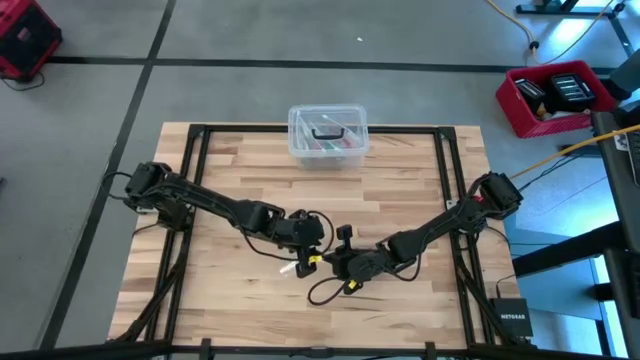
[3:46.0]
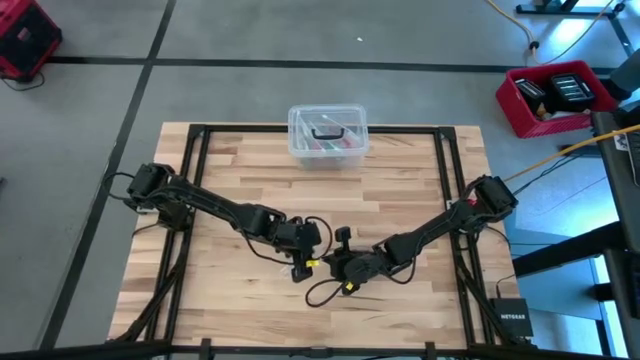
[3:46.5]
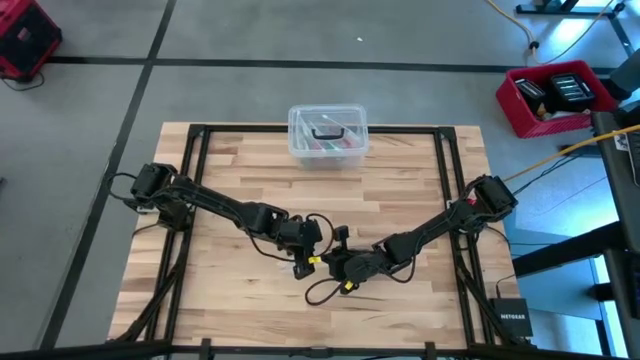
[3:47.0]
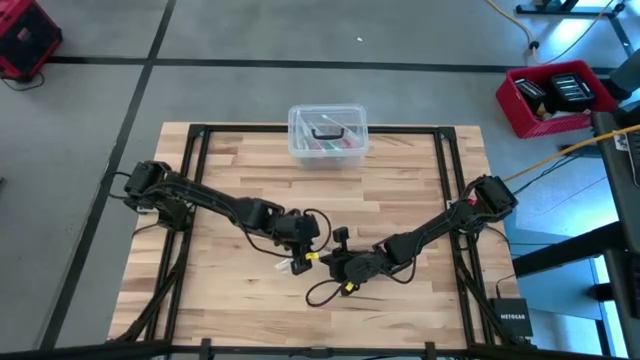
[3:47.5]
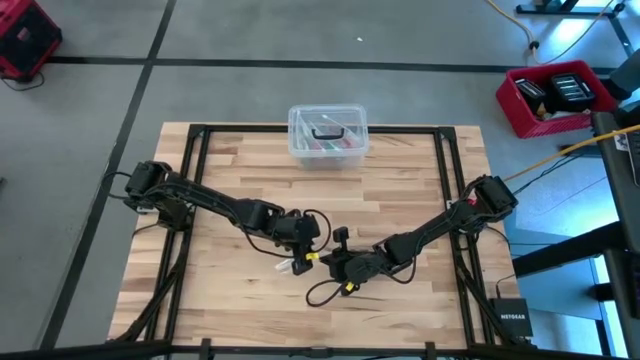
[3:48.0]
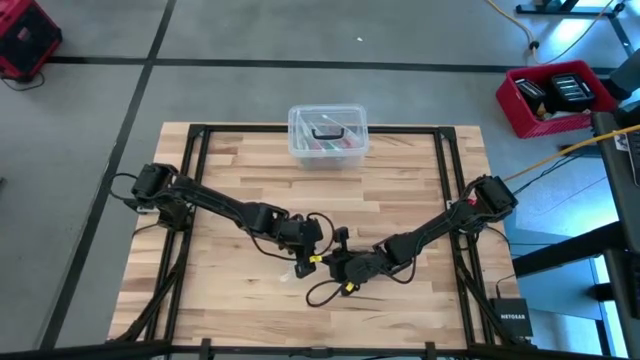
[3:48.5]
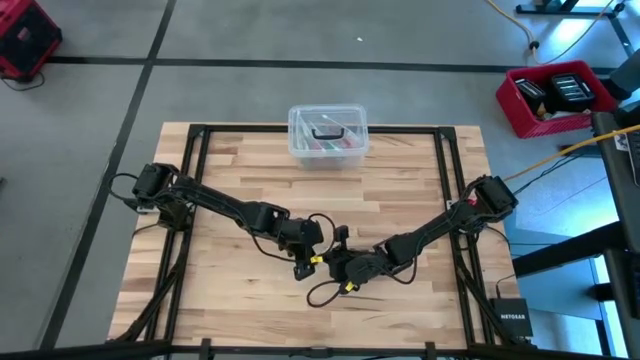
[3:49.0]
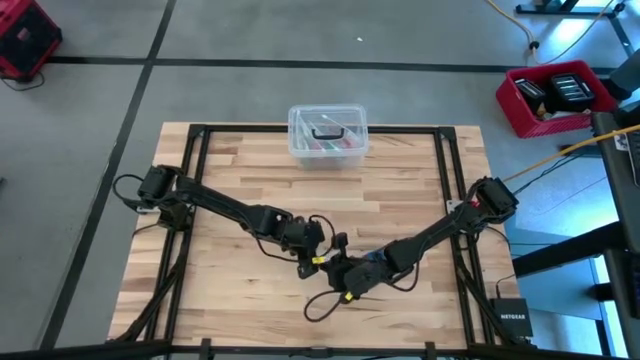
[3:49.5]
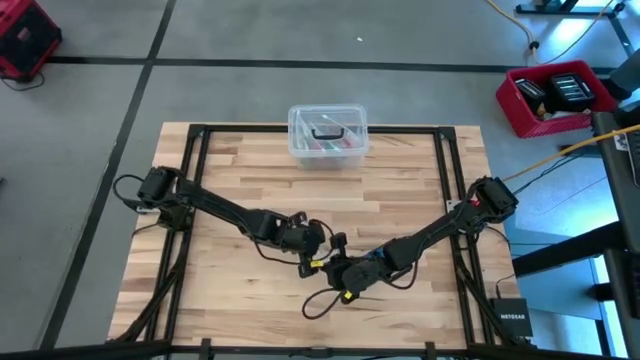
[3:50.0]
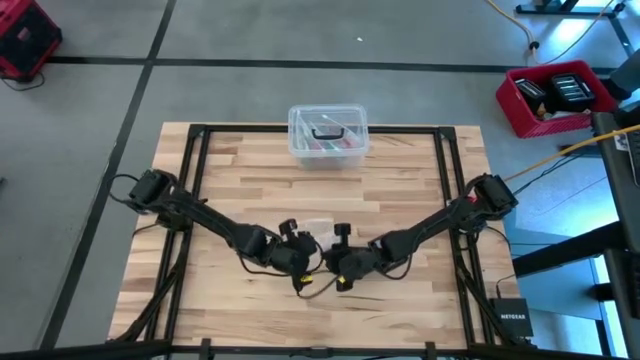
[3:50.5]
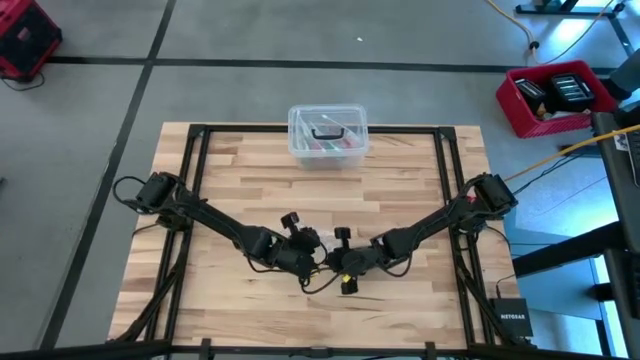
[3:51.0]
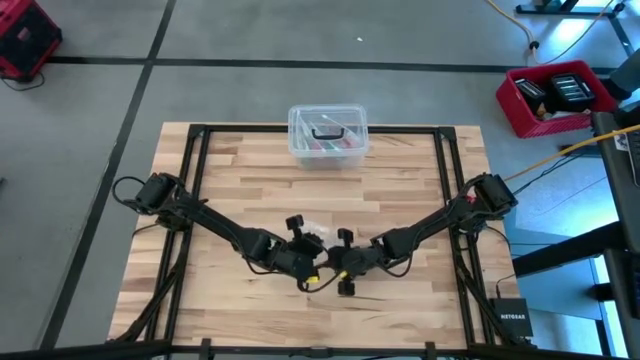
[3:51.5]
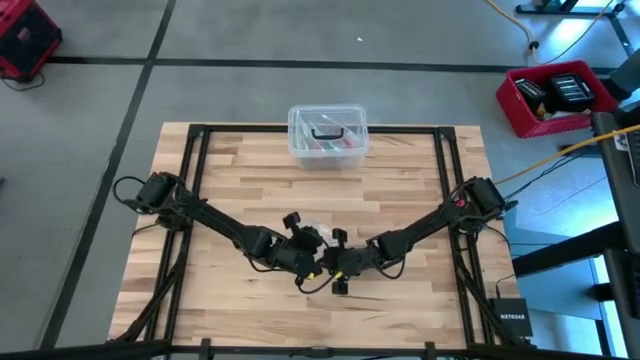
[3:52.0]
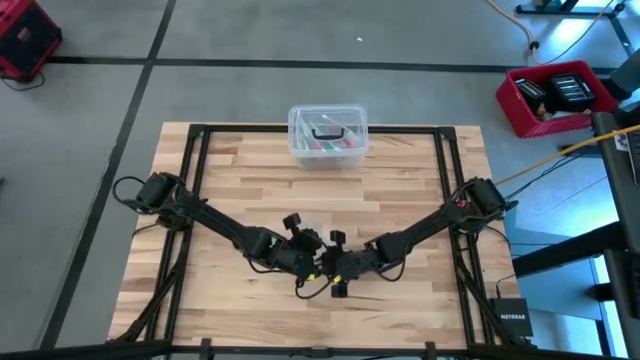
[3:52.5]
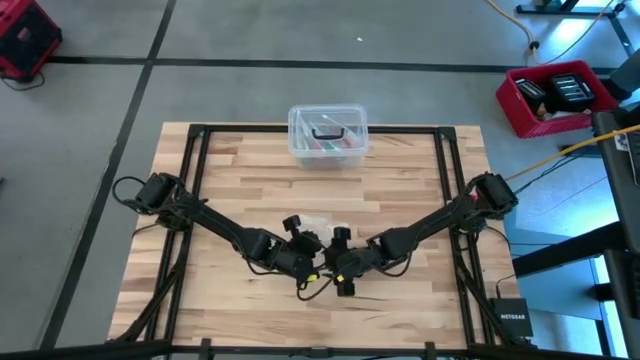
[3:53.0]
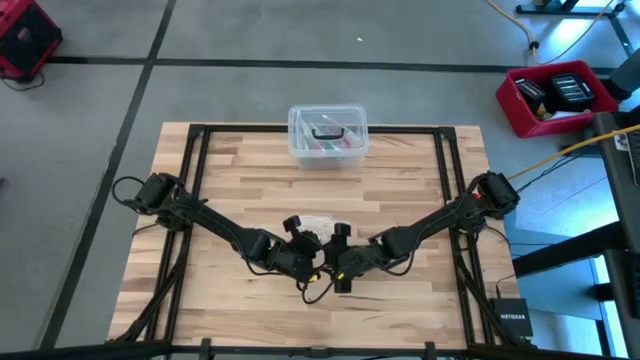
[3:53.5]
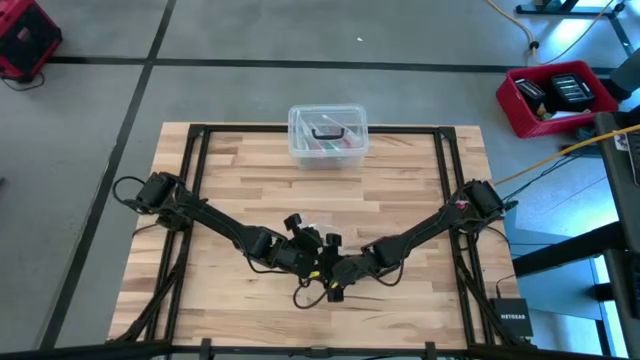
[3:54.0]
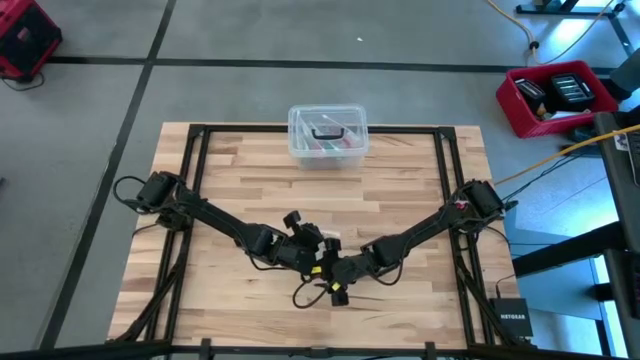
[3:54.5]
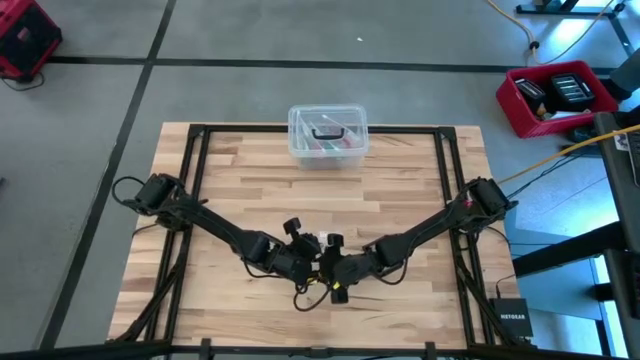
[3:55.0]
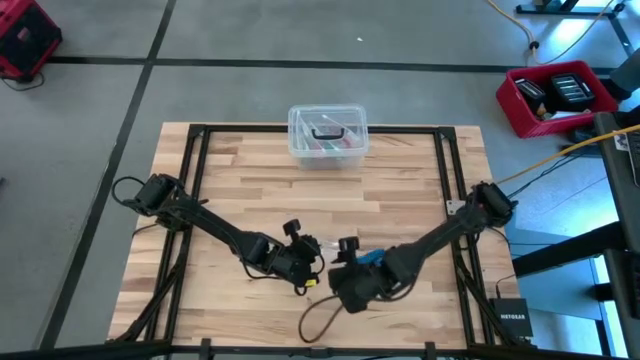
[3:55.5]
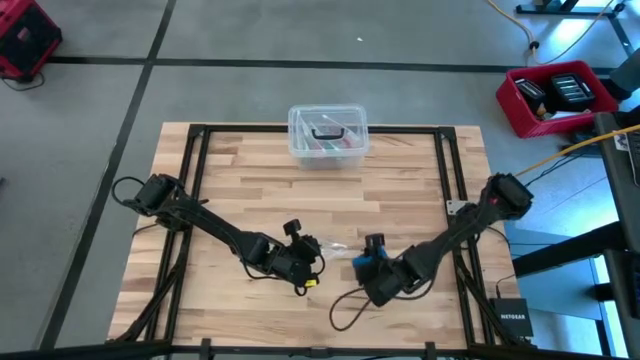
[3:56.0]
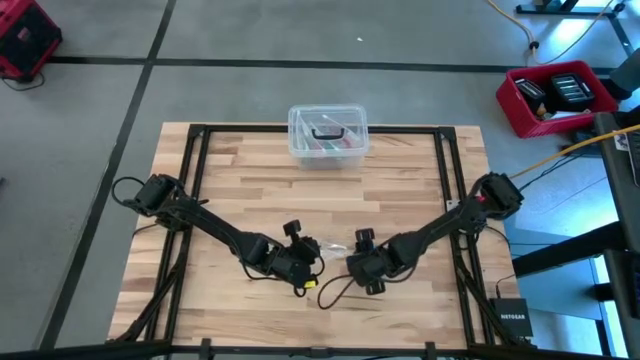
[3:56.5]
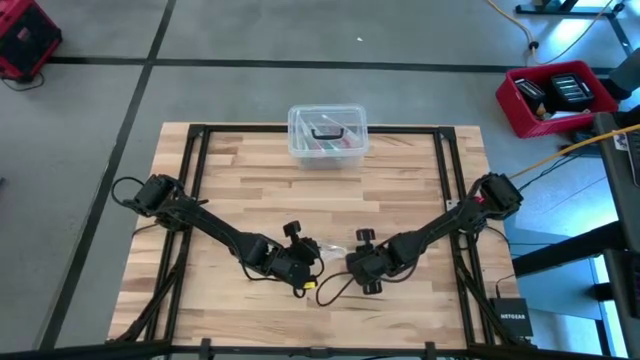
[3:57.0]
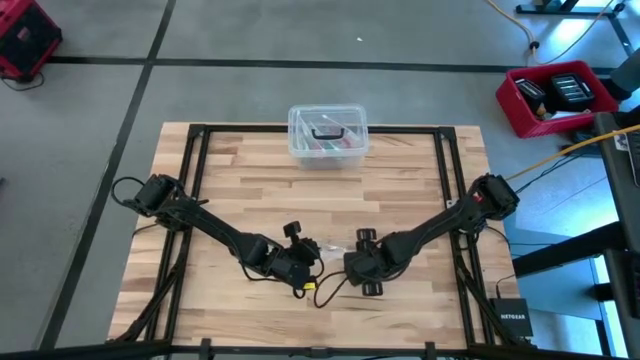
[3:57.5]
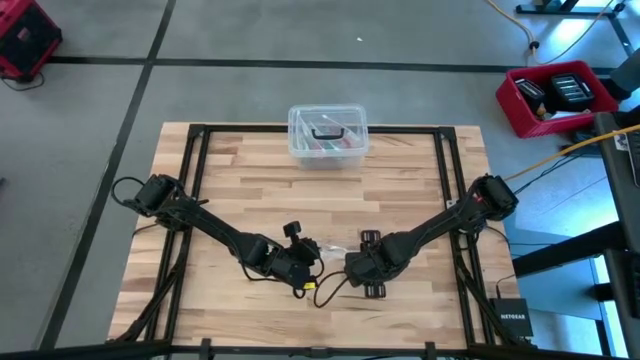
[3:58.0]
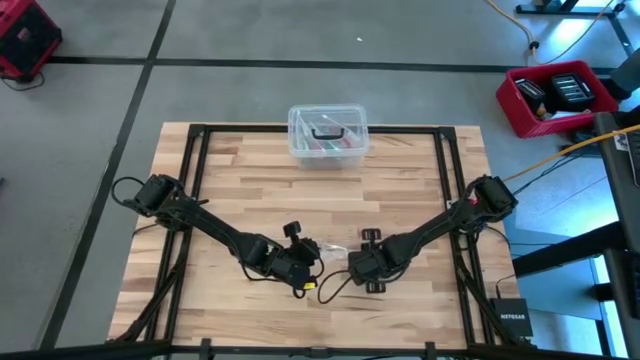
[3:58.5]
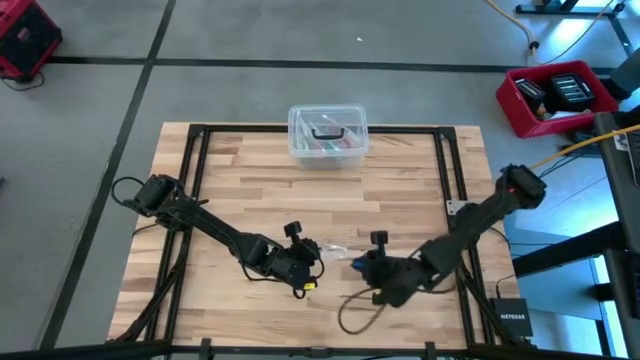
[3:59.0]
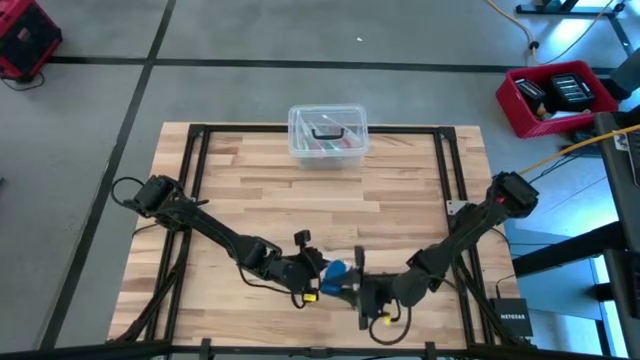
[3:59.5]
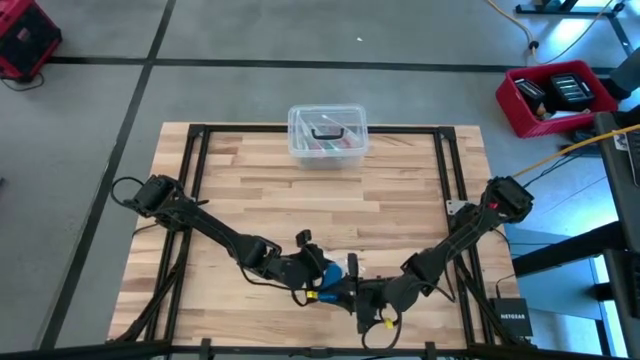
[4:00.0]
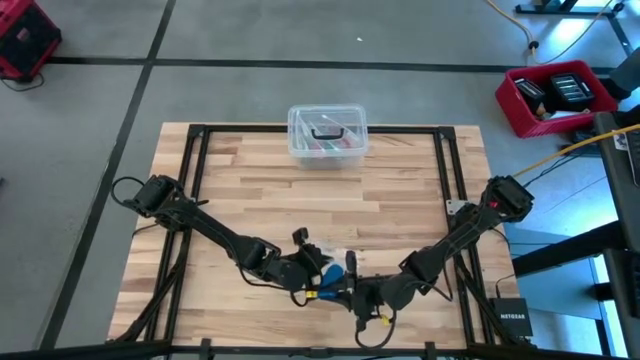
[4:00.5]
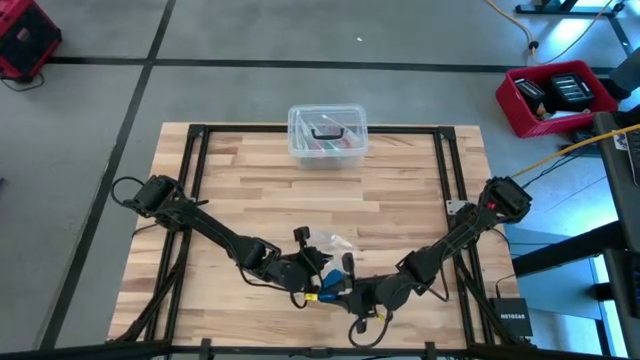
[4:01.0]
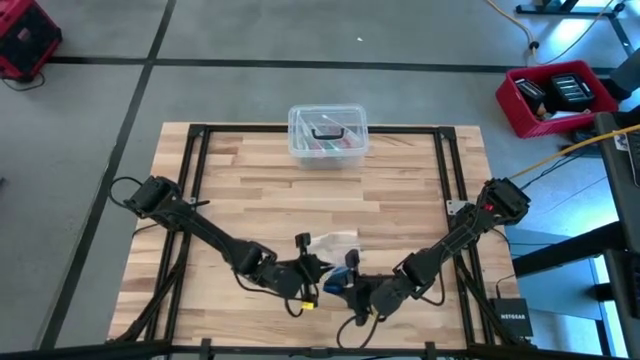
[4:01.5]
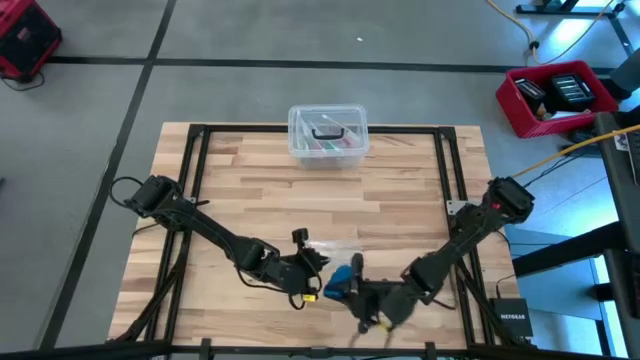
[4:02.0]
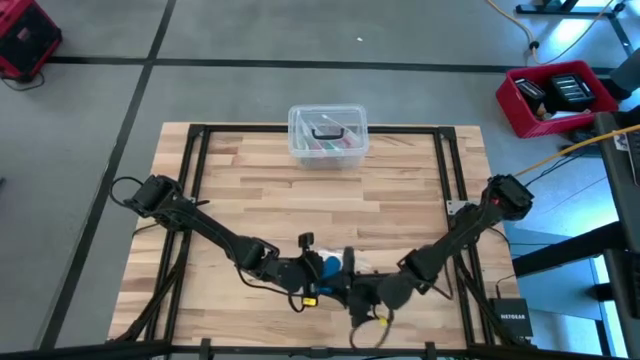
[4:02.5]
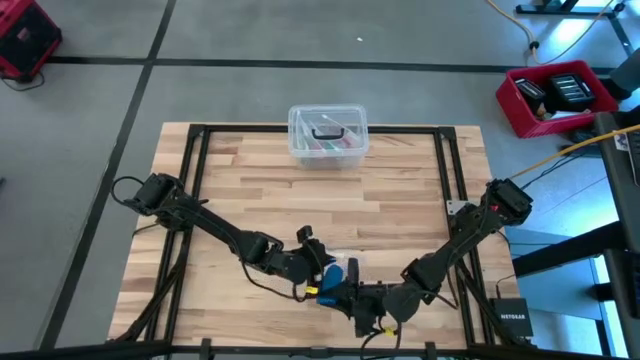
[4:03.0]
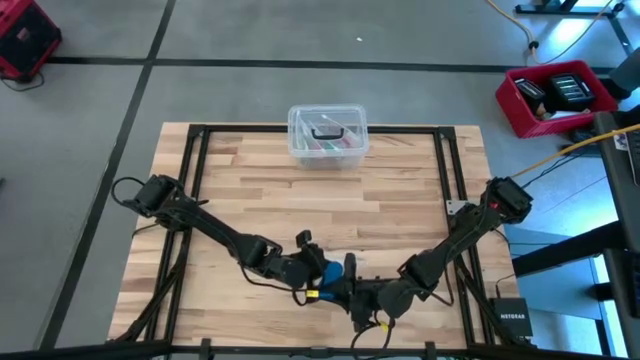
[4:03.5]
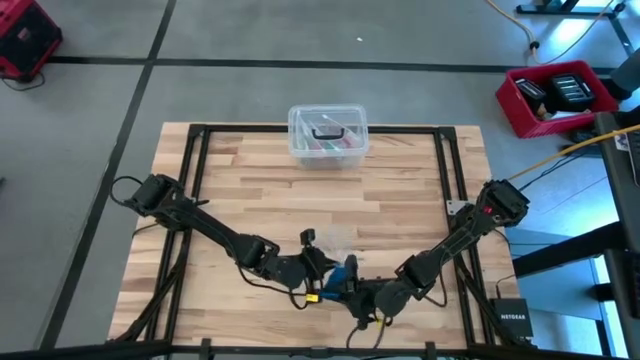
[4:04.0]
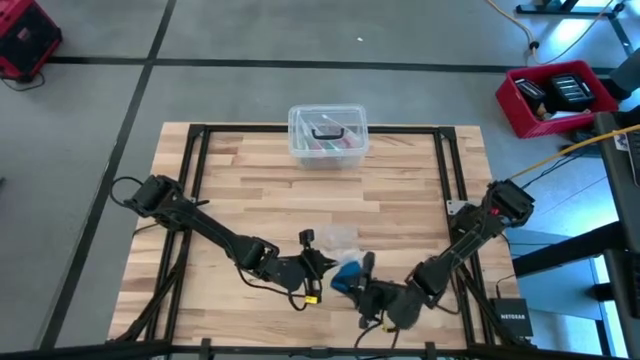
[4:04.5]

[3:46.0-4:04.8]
Task: Roll bandage
Put the rolled blue bandage into the transparent zip bag

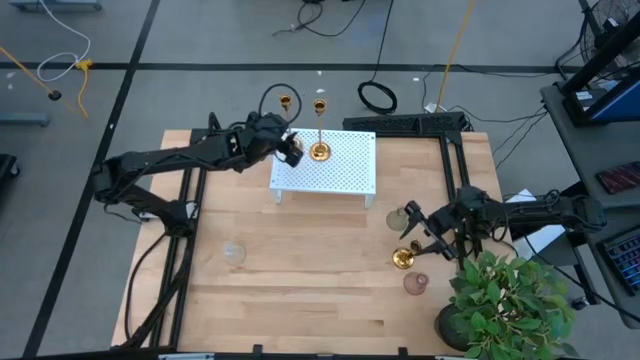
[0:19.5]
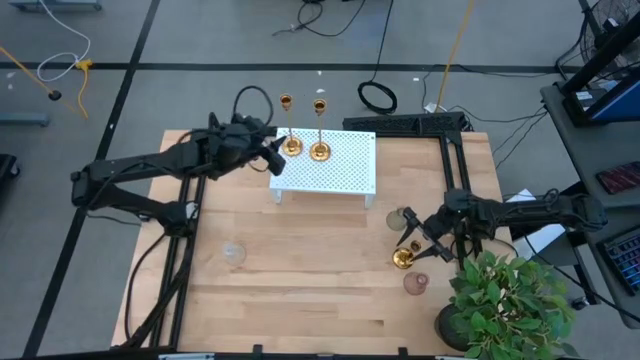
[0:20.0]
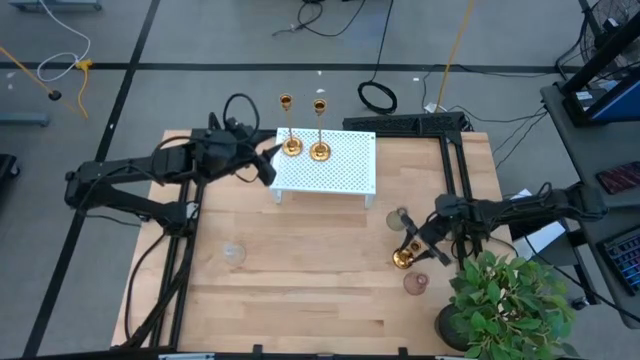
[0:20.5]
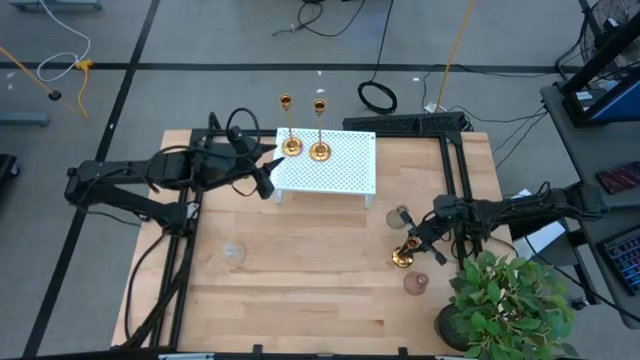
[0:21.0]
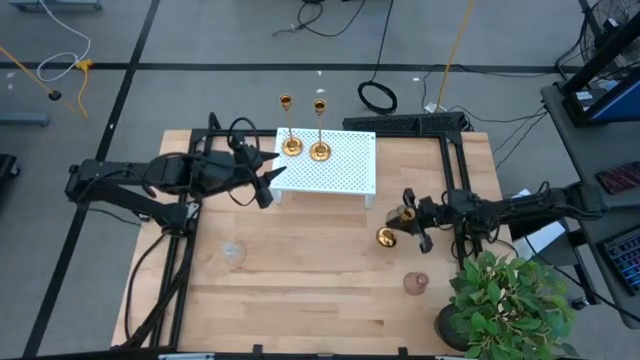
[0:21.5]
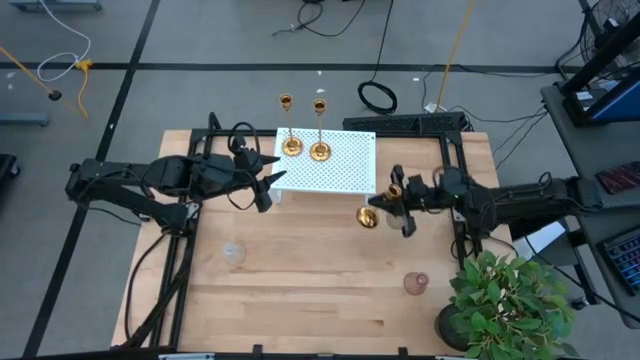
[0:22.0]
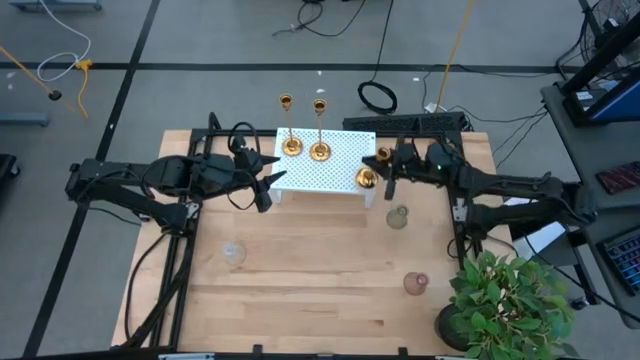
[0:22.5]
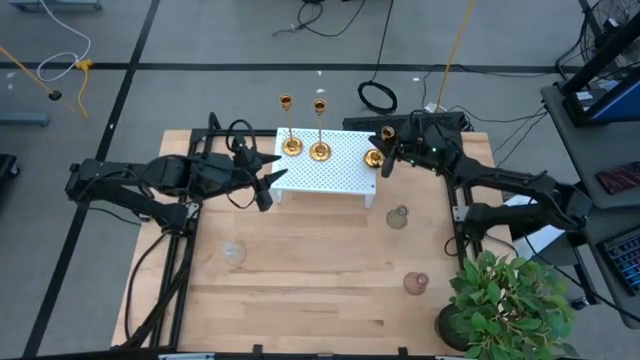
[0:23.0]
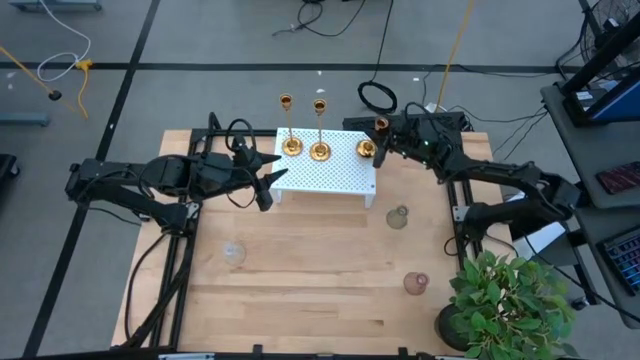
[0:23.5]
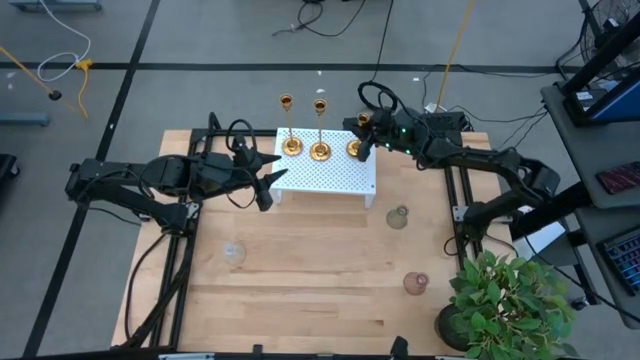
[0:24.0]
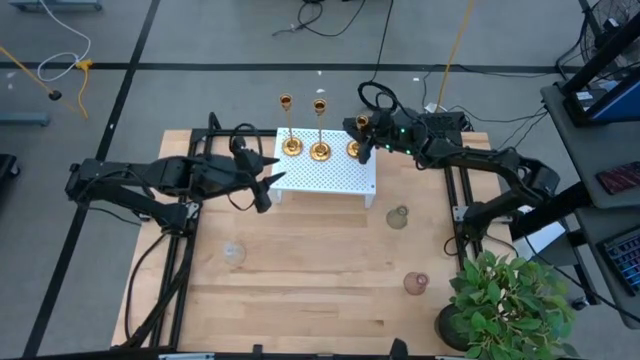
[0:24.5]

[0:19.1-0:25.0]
Task: Pick & Place candle stick holders
Put the short gold candle holder on the shelf
